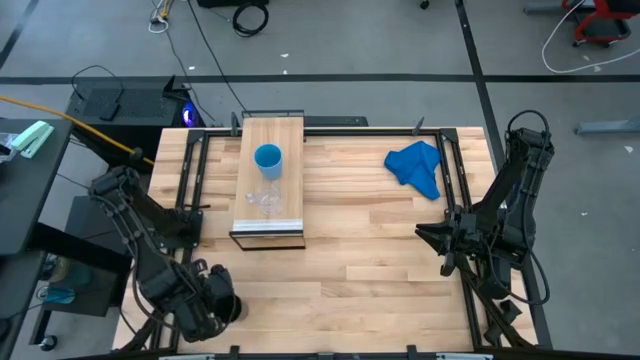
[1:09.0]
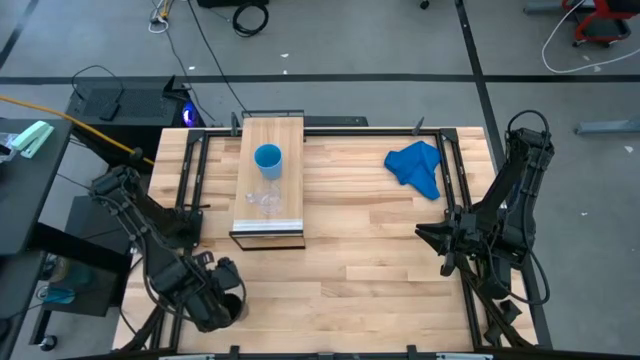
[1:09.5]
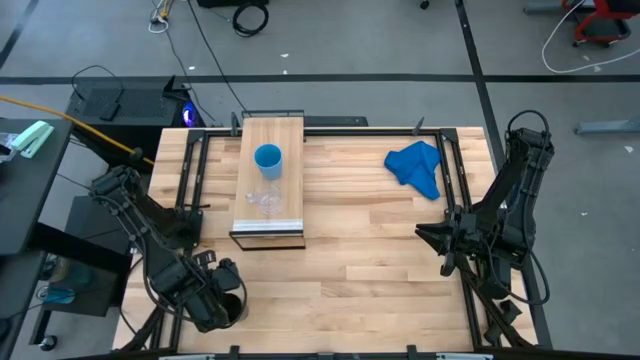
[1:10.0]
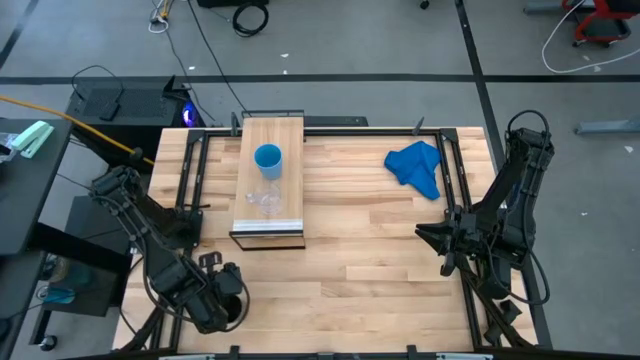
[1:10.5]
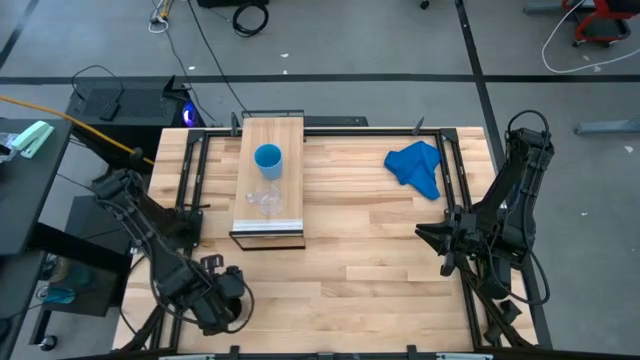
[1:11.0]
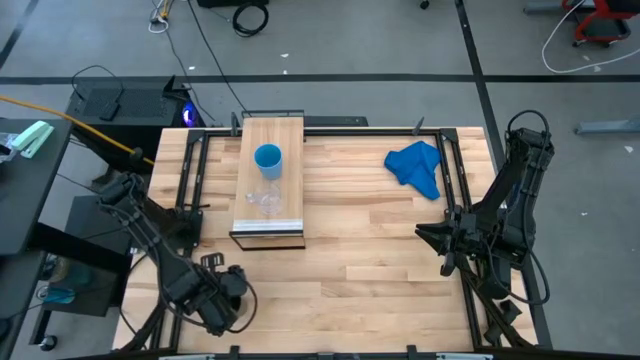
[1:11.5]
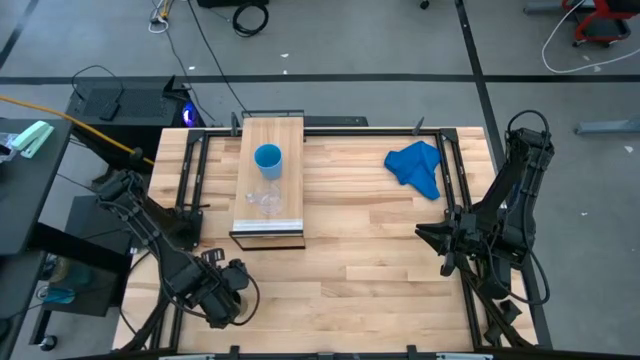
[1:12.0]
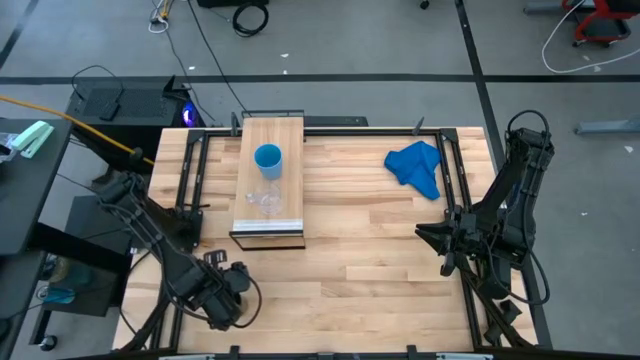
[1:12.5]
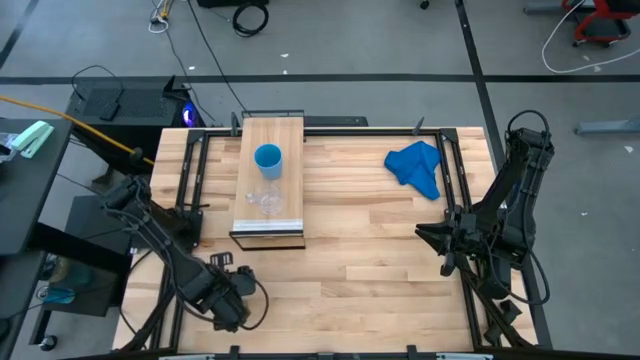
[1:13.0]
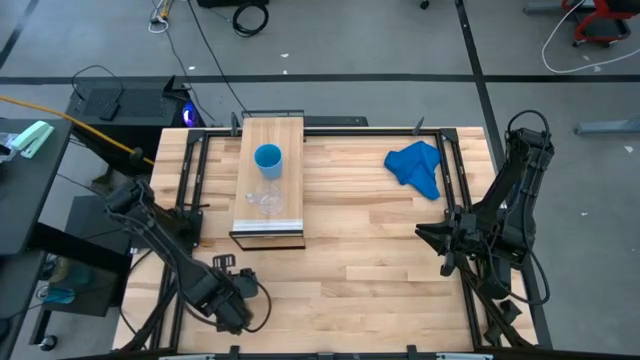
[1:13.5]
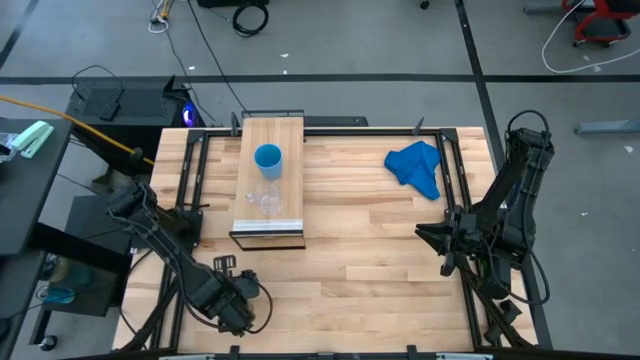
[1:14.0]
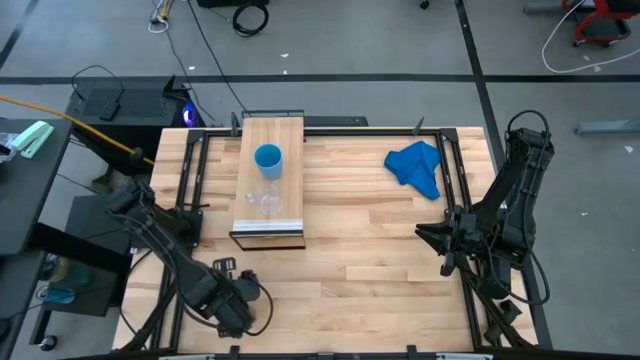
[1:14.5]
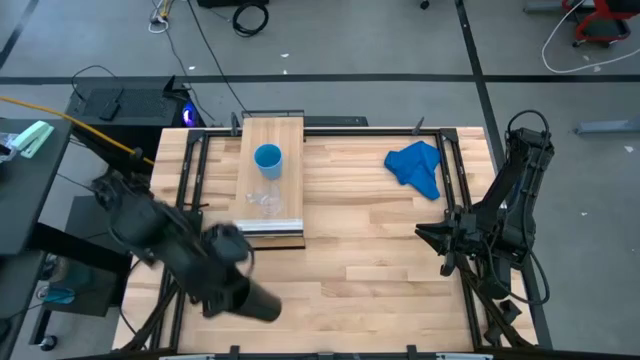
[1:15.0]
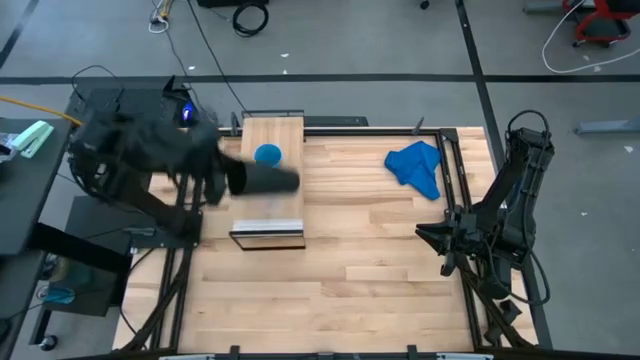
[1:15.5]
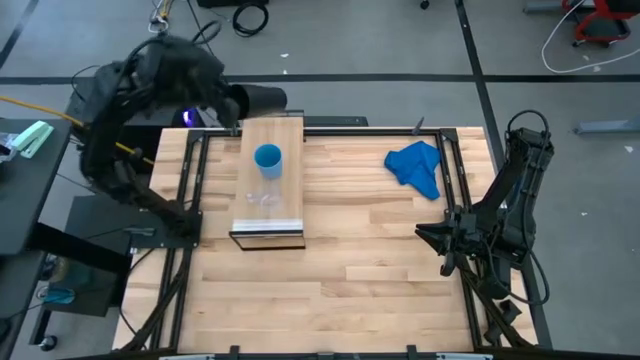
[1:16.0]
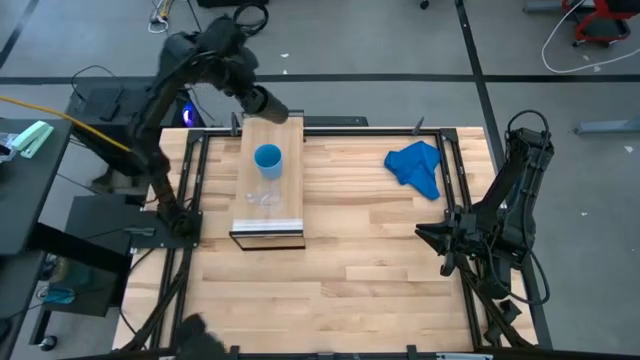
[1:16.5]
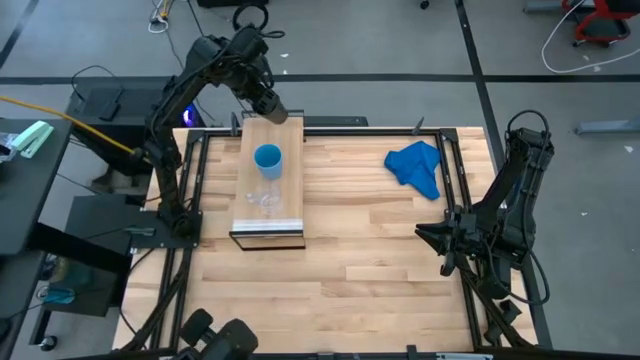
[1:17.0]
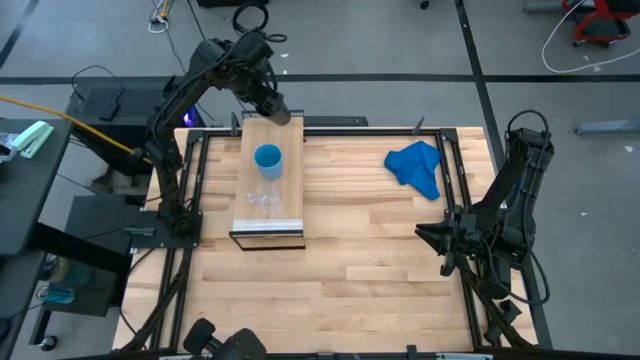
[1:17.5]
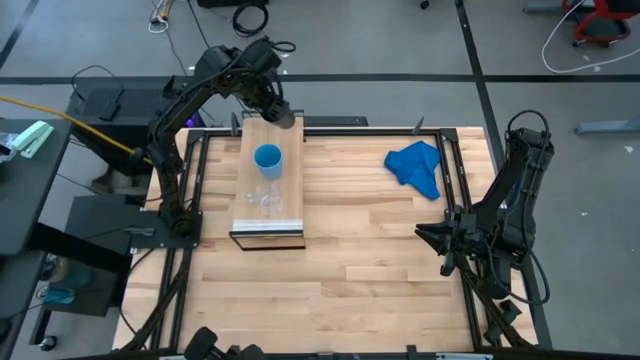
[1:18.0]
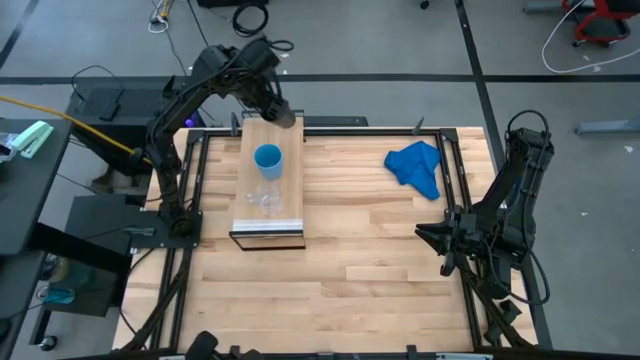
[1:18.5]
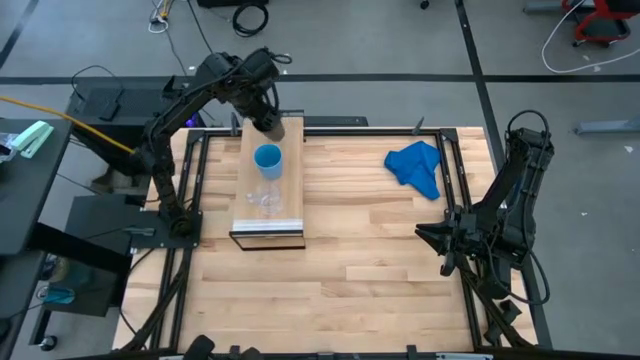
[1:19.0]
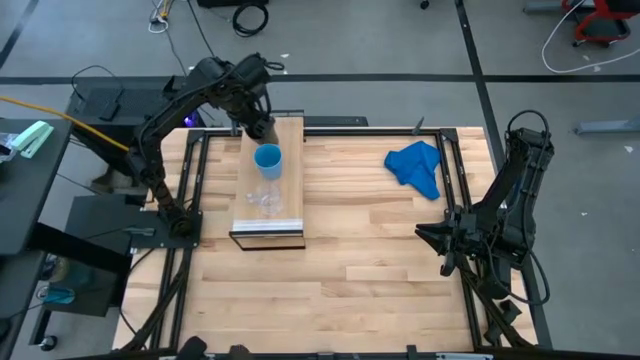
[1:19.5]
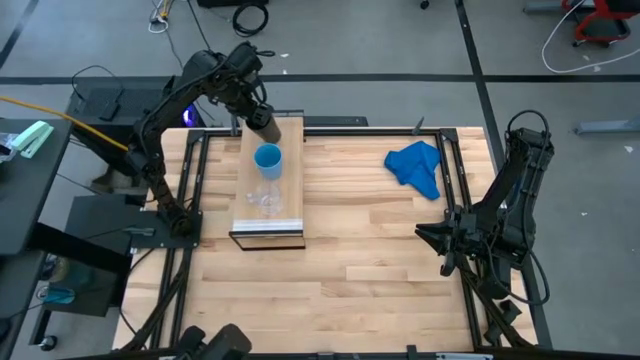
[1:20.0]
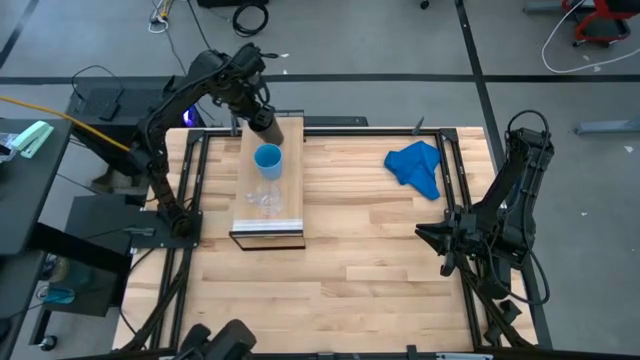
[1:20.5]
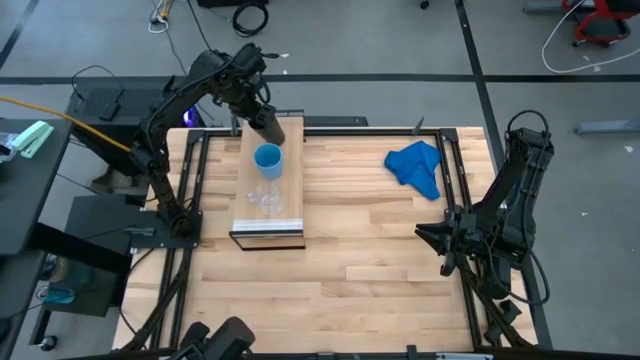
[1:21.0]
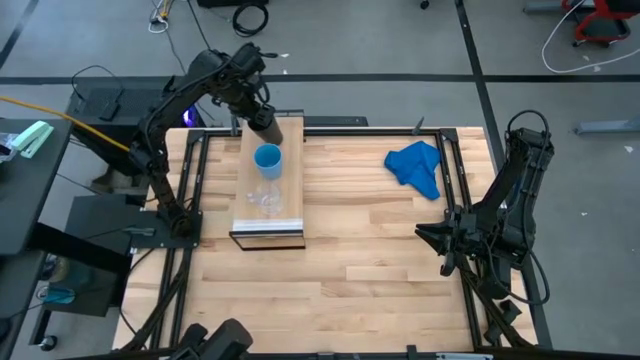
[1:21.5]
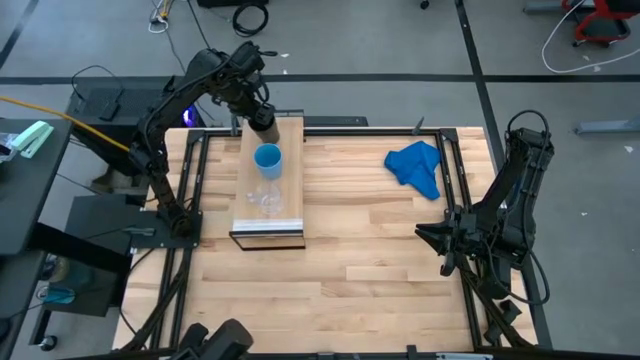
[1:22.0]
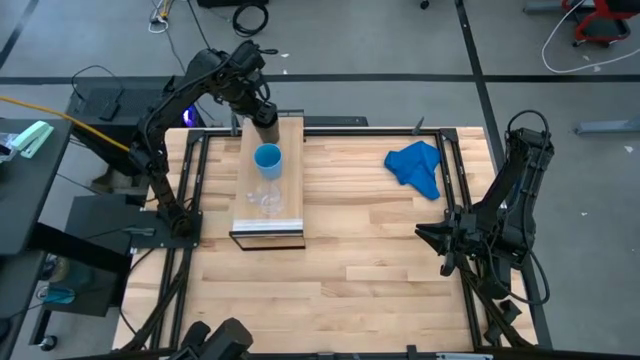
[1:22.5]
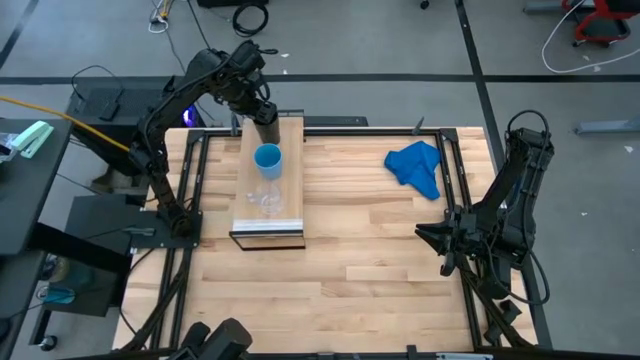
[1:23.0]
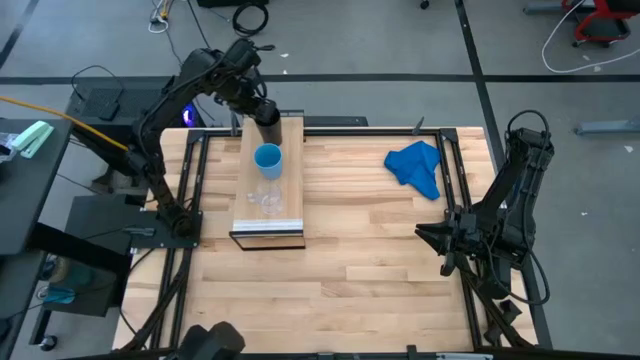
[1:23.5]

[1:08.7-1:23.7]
Task: Stack small to large cups/mugs on shelf
Put the black cup on the shelf

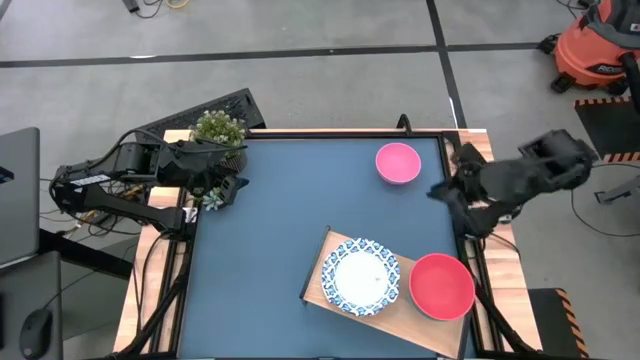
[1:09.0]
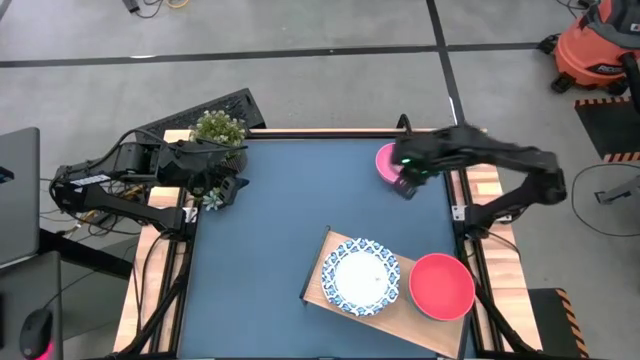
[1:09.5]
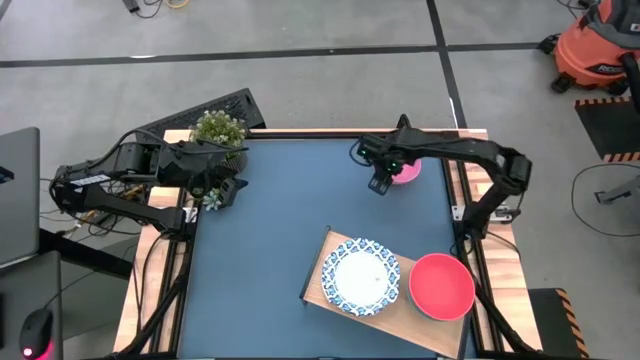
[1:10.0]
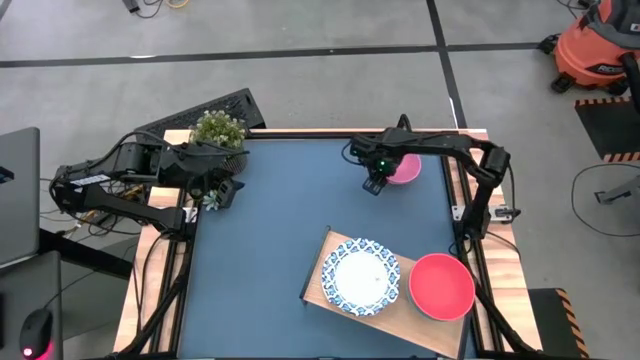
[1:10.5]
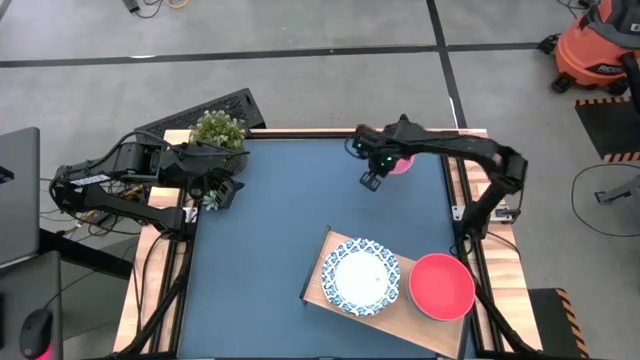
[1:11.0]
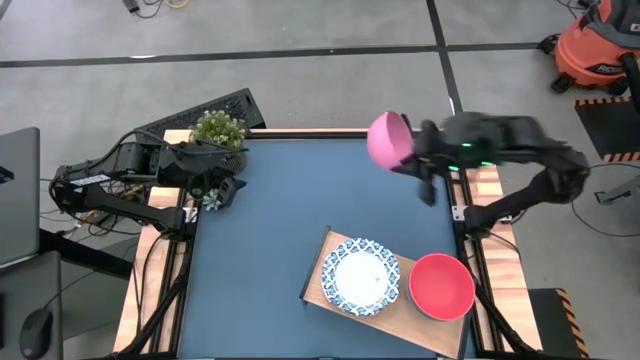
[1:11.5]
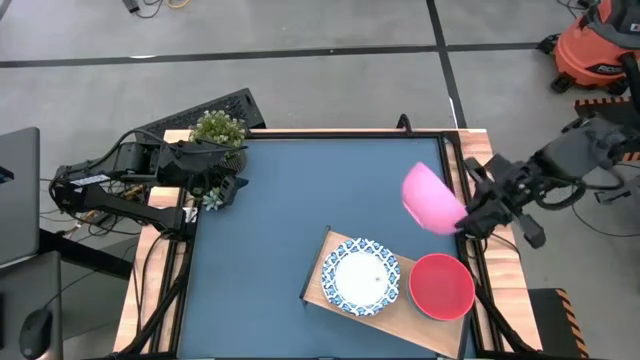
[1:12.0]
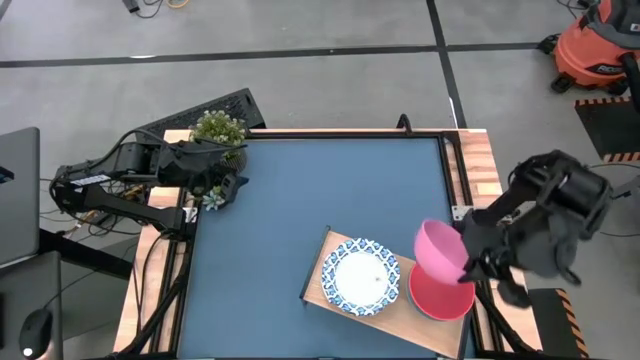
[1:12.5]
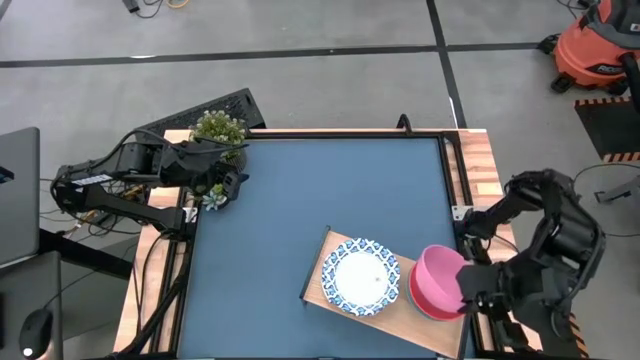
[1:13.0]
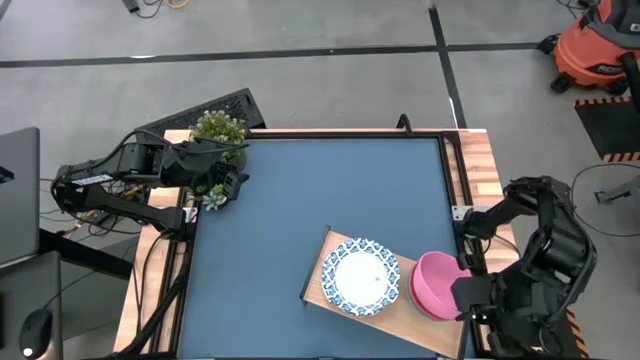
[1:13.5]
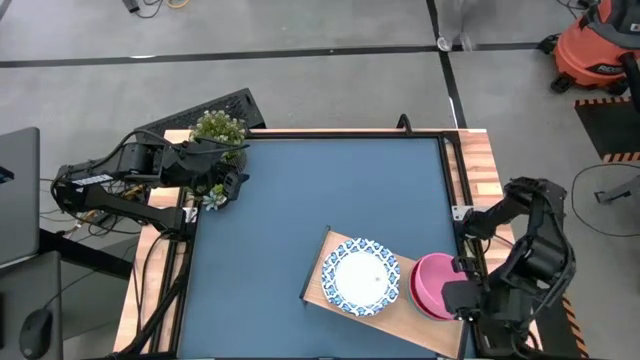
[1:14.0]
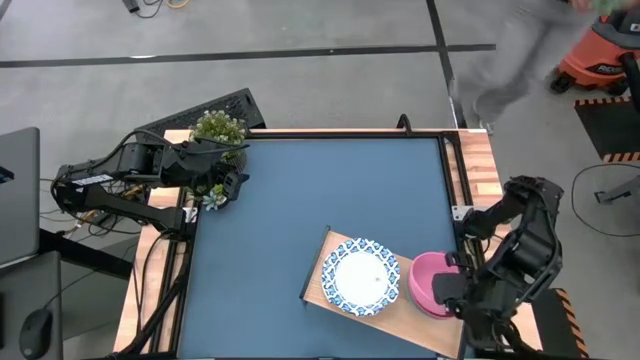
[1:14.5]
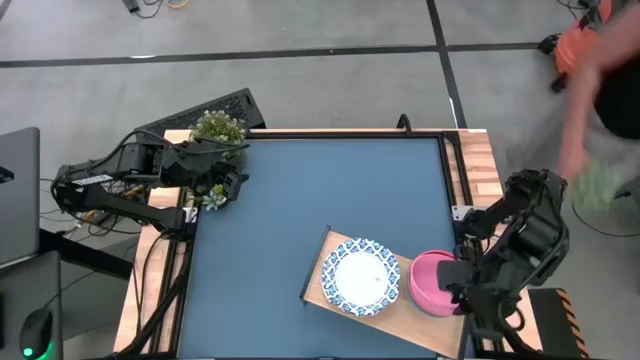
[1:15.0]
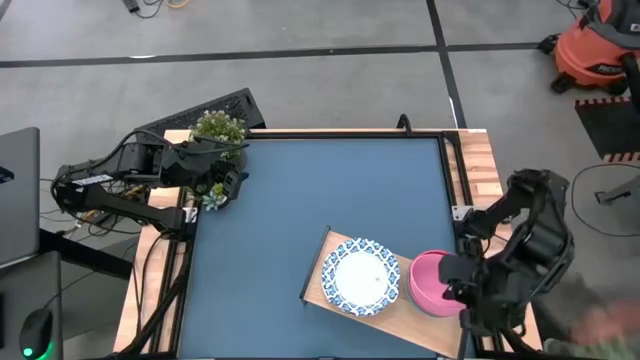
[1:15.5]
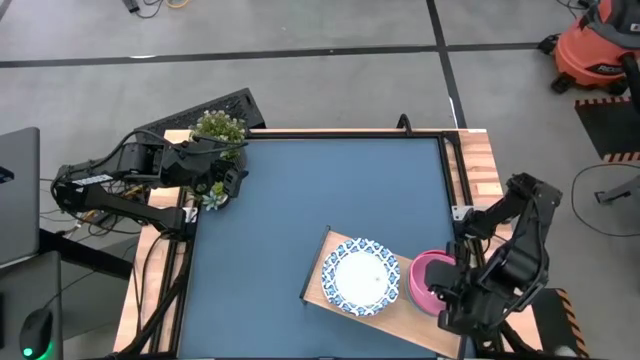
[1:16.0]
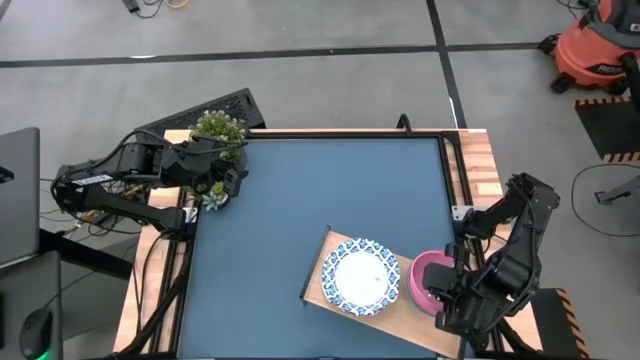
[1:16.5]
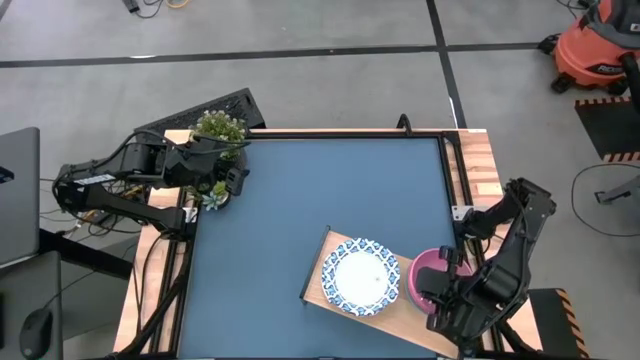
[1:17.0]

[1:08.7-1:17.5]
Task: Place and stack bowls onto a shelf
Stack the pink bowl on top of the orange bowl on the shelf
